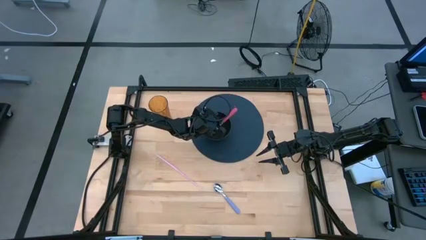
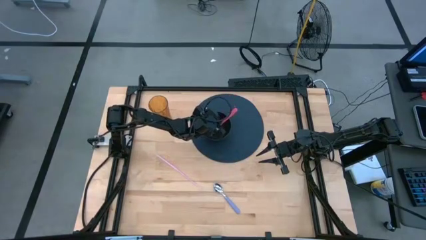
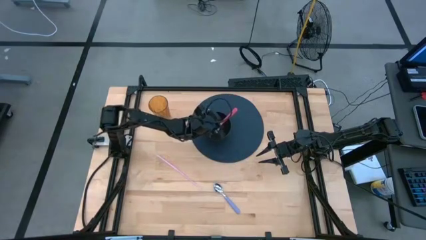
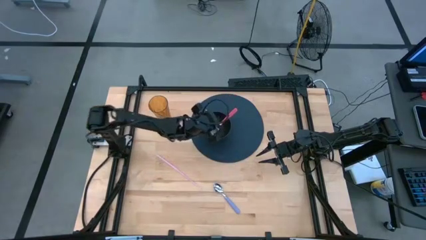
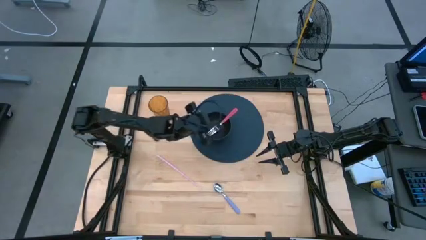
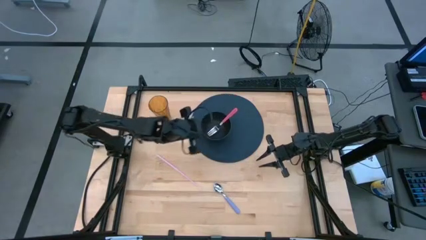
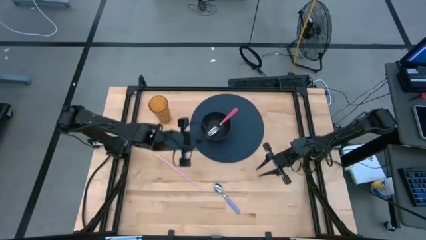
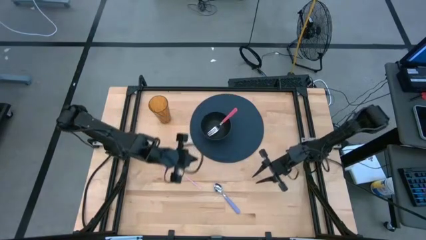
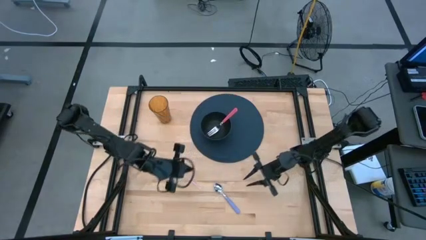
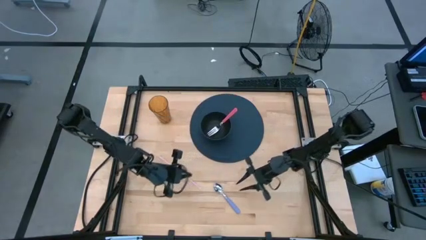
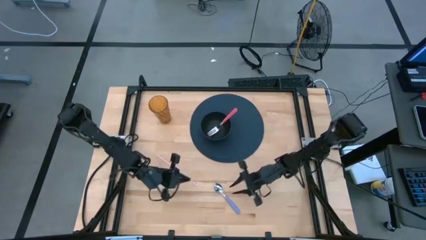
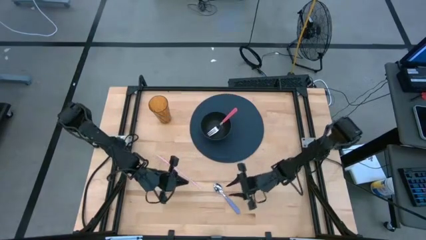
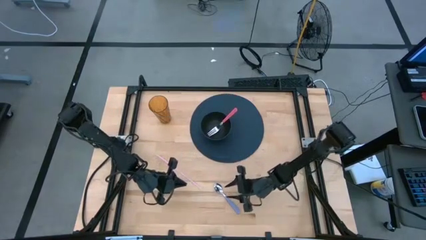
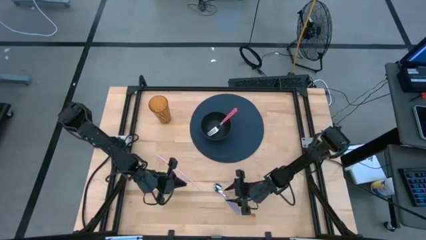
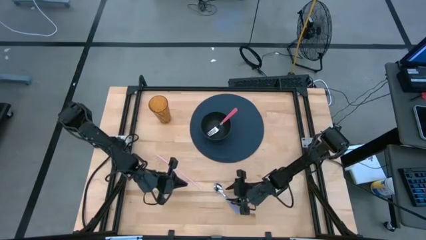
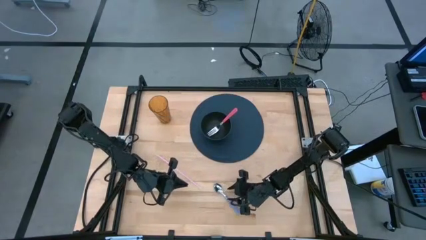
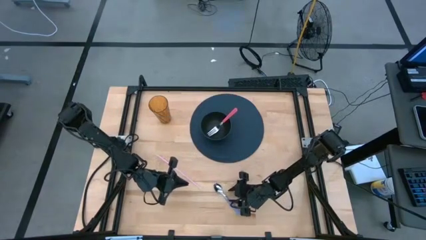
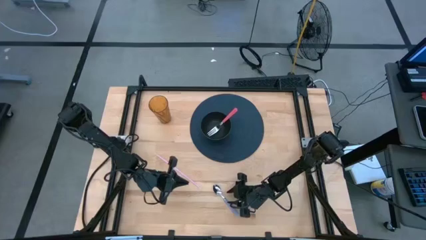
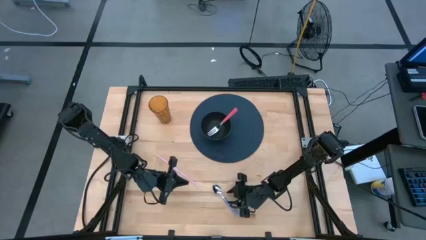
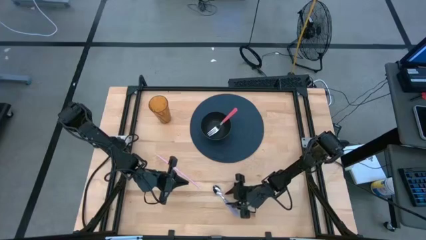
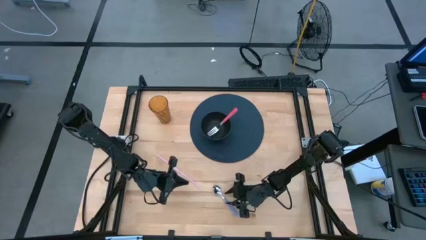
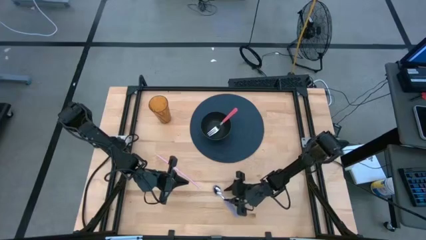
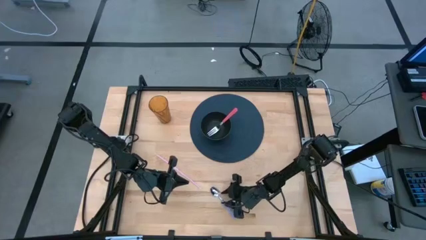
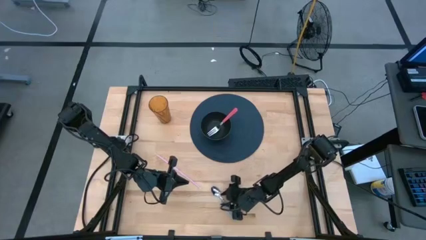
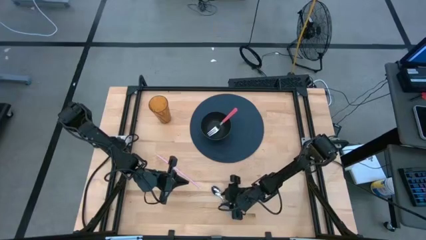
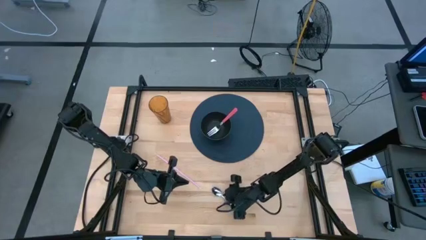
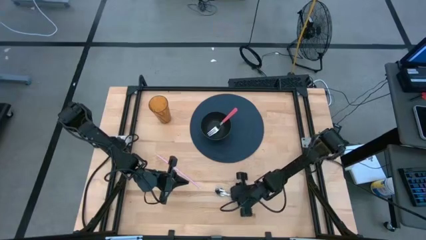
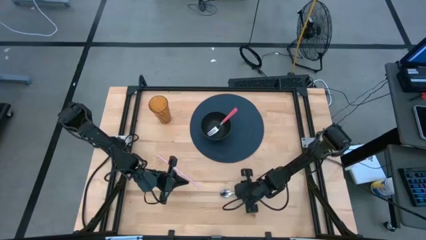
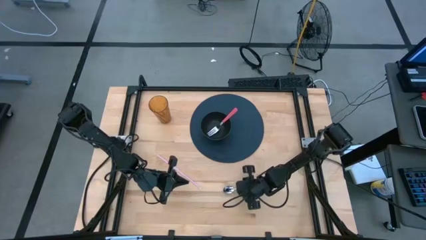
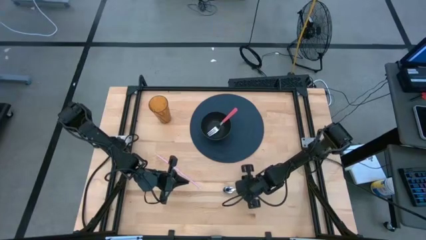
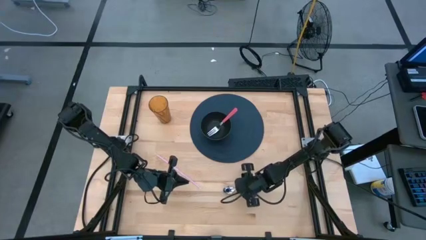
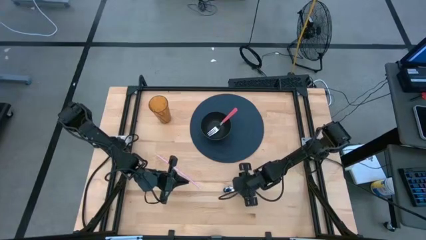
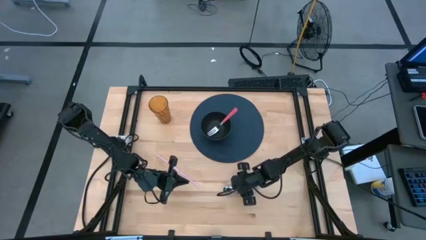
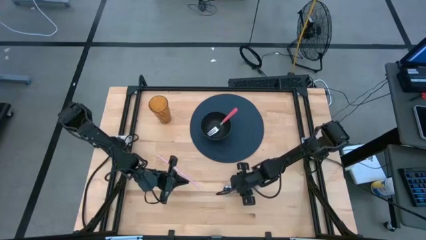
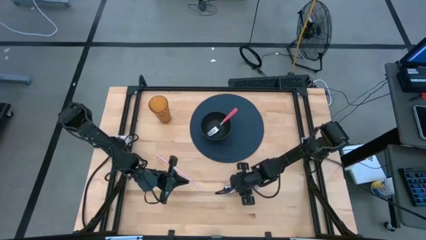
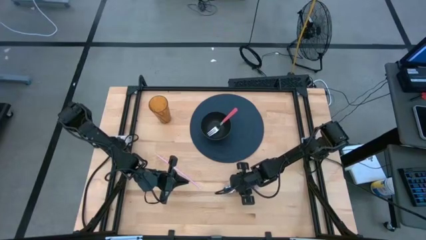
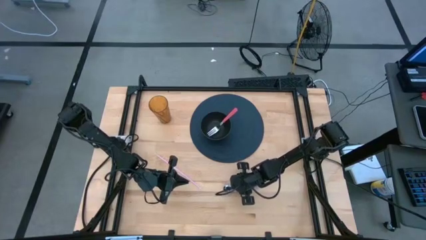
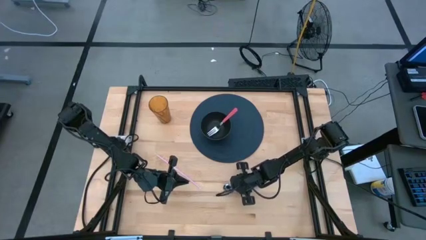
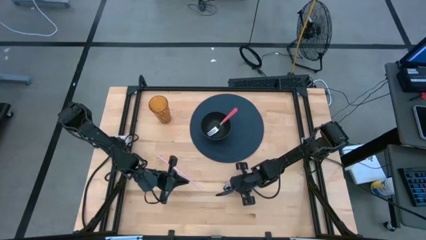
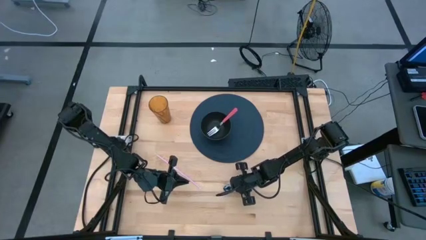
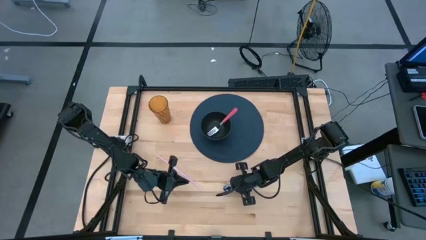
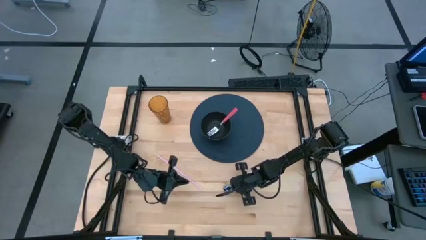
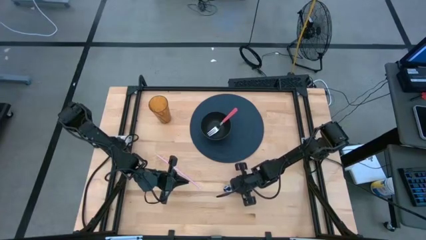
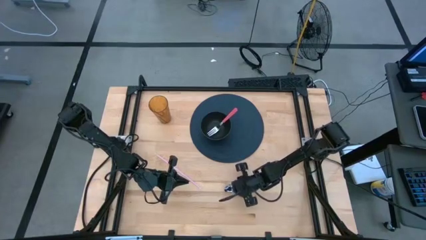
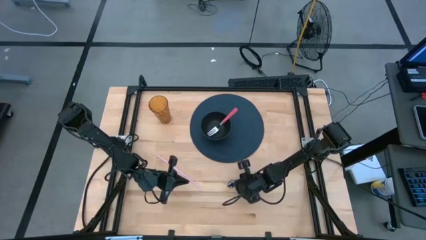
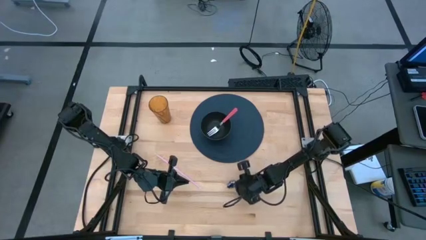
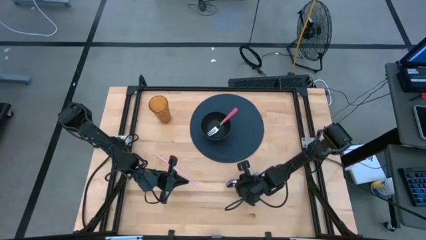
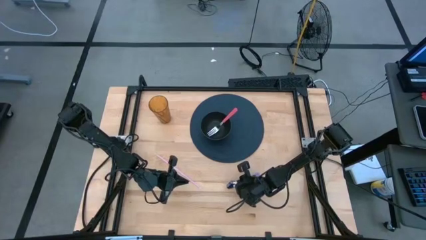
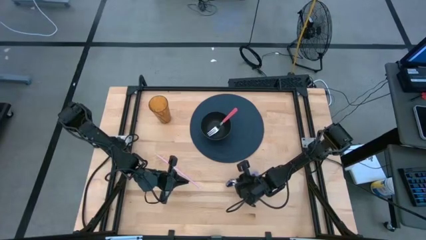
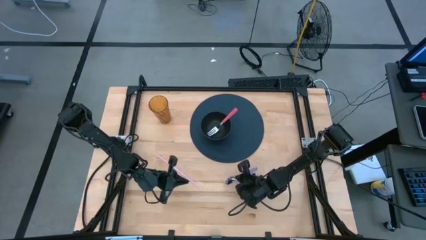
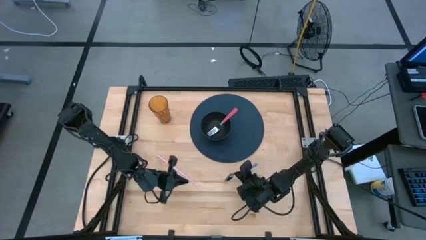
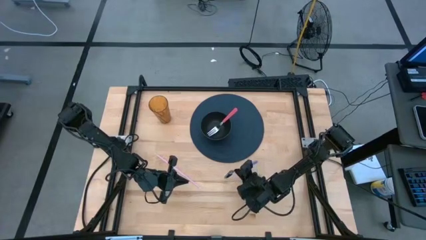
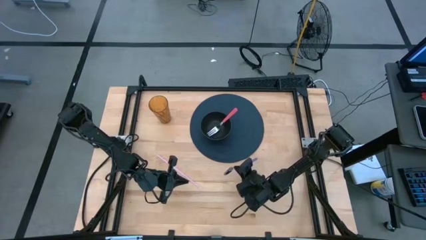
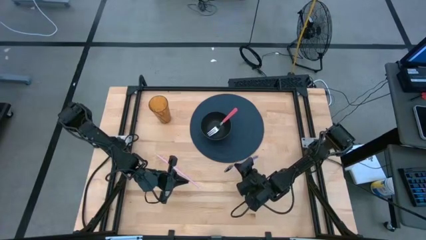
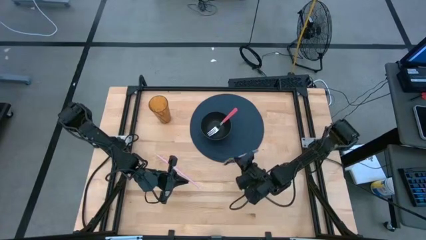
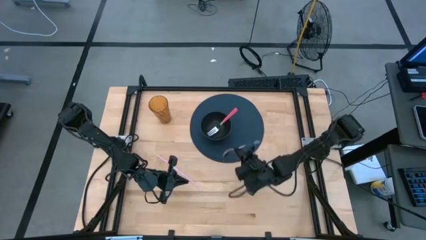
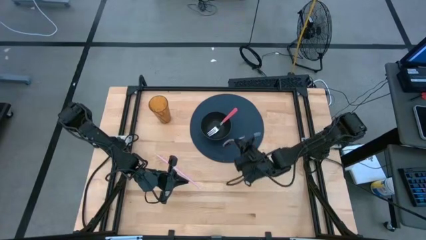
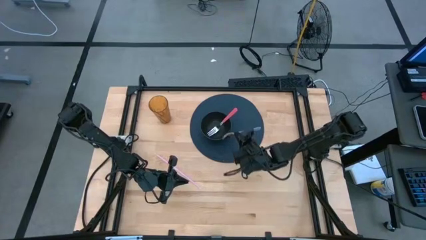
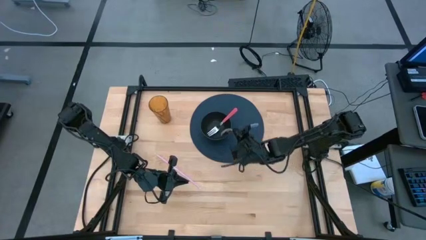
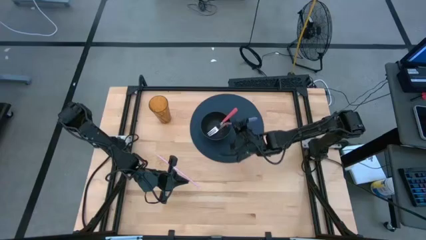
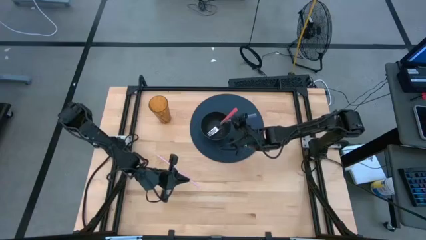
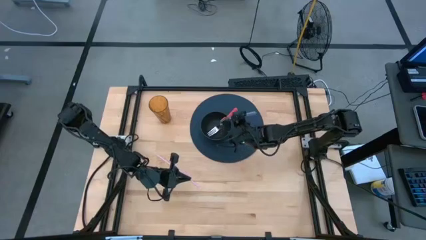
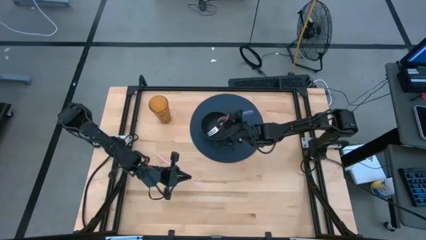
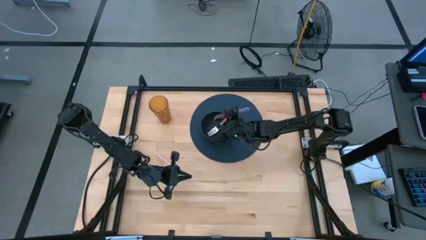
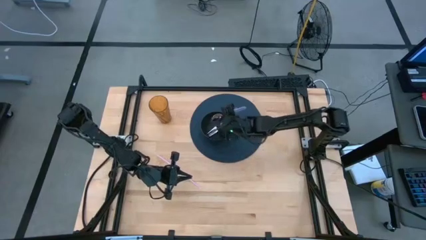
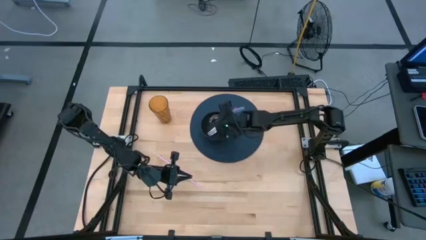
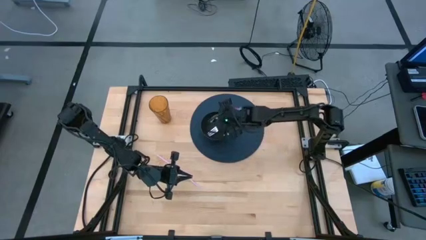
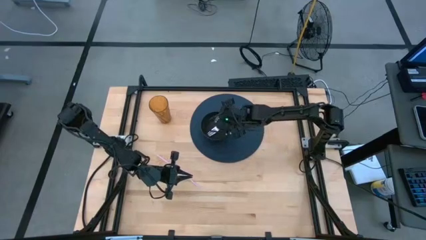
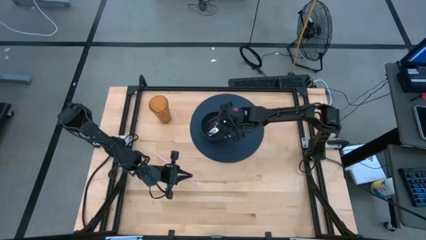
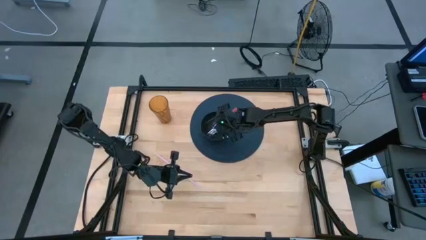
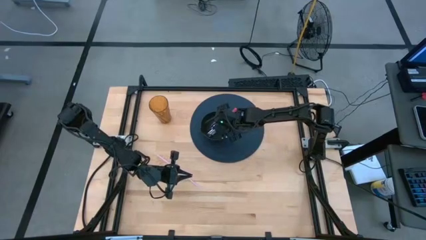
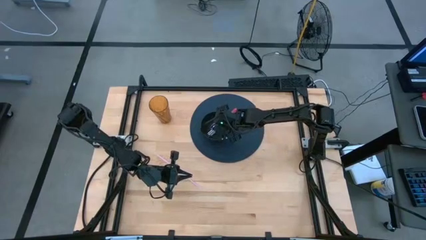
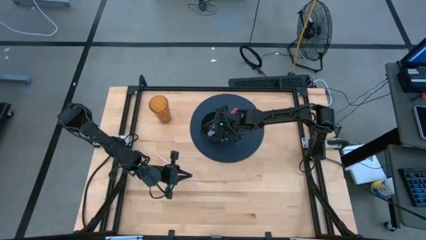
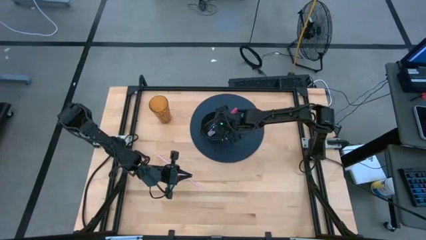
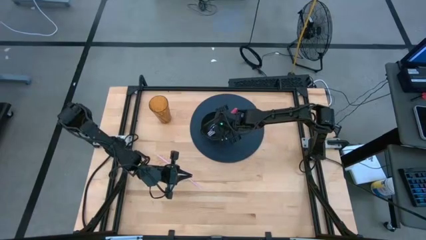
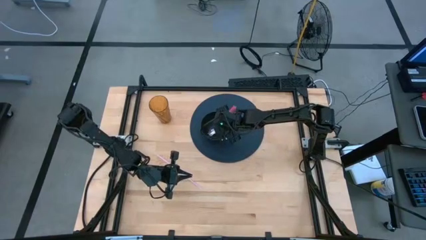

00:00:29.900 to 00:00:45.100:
Task: Pick & Place Utensil
Put the spoon into the bowl
